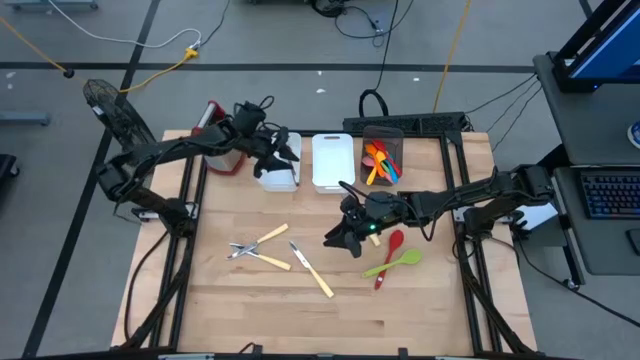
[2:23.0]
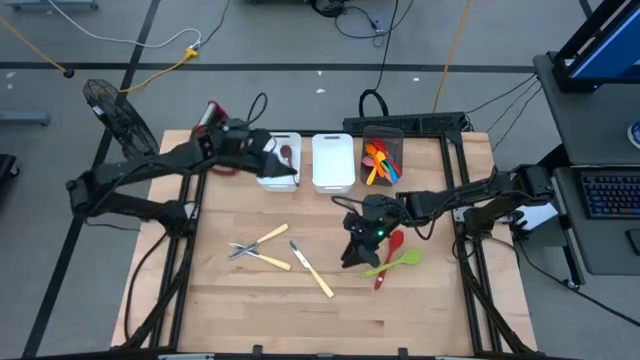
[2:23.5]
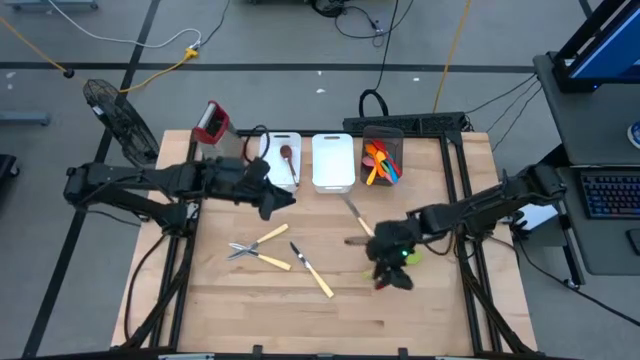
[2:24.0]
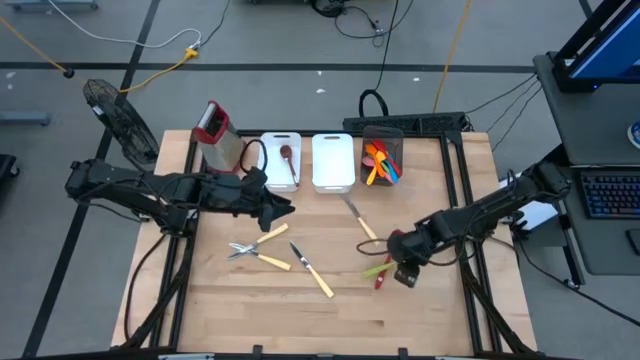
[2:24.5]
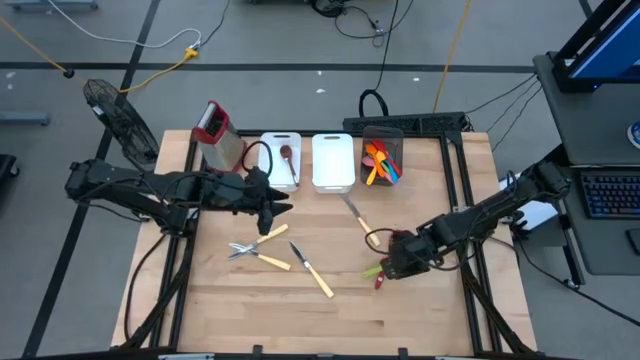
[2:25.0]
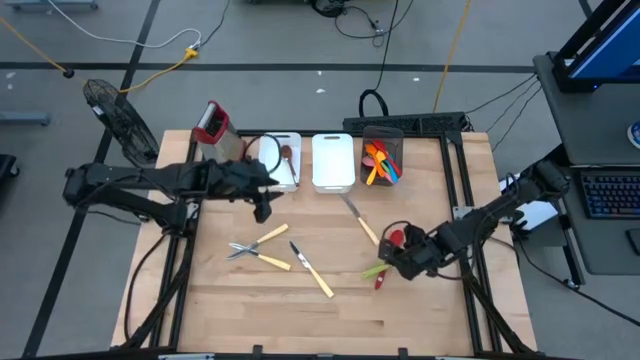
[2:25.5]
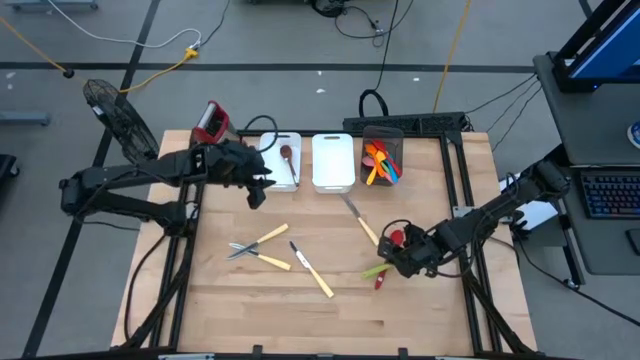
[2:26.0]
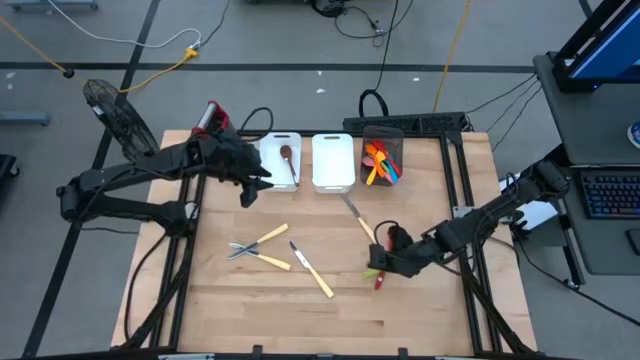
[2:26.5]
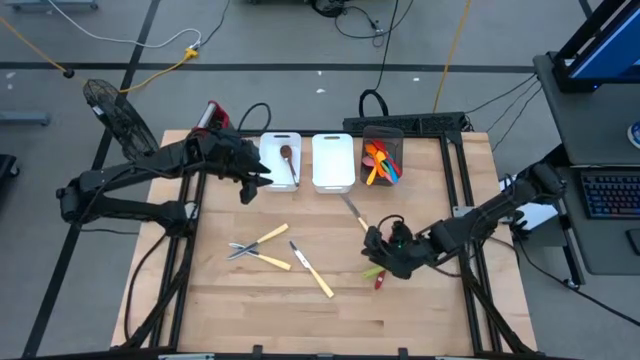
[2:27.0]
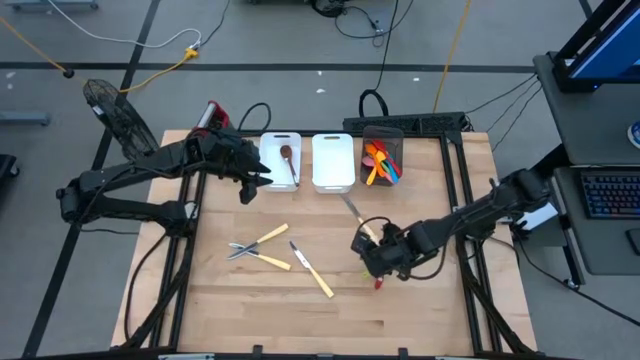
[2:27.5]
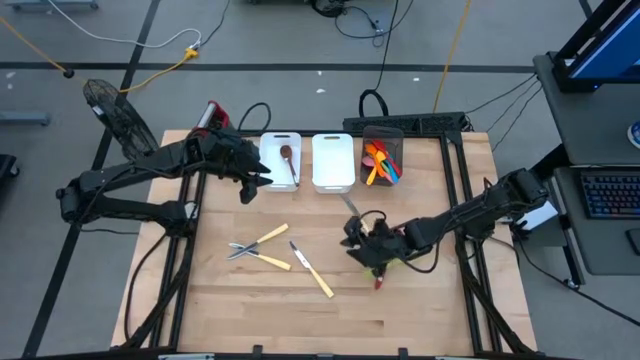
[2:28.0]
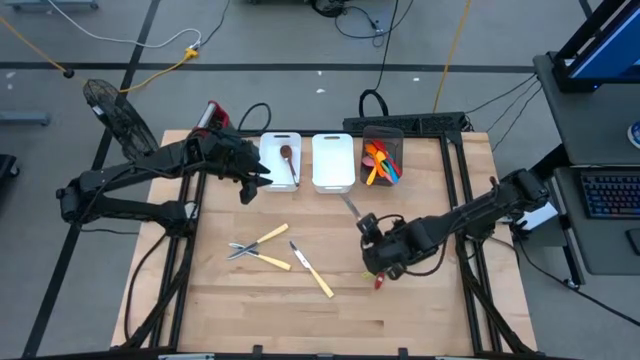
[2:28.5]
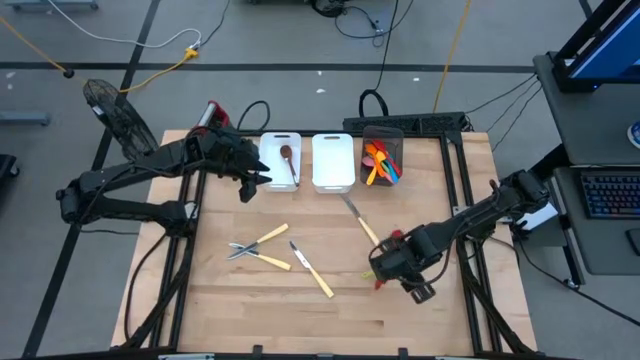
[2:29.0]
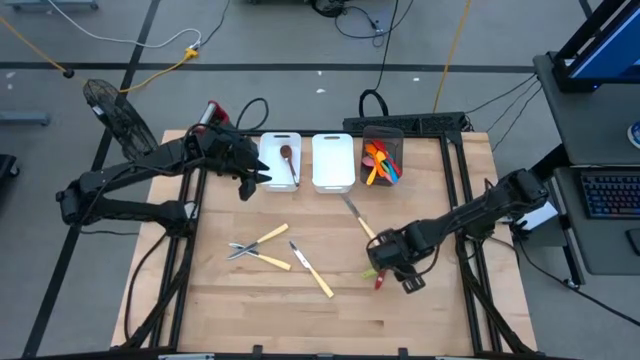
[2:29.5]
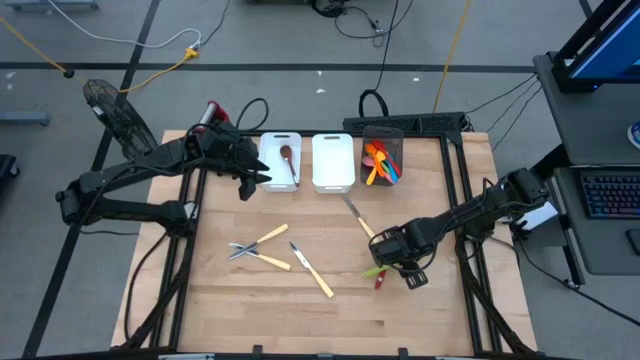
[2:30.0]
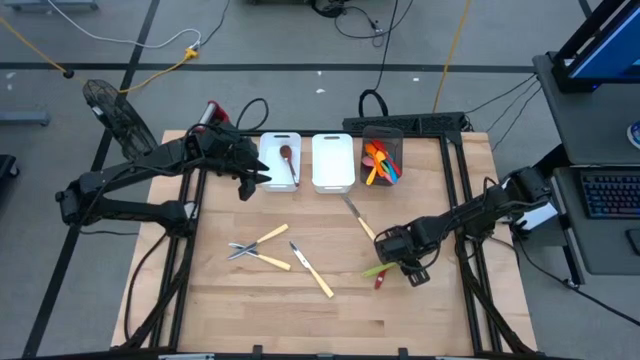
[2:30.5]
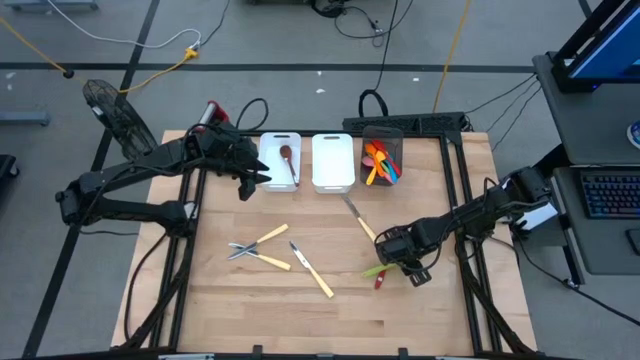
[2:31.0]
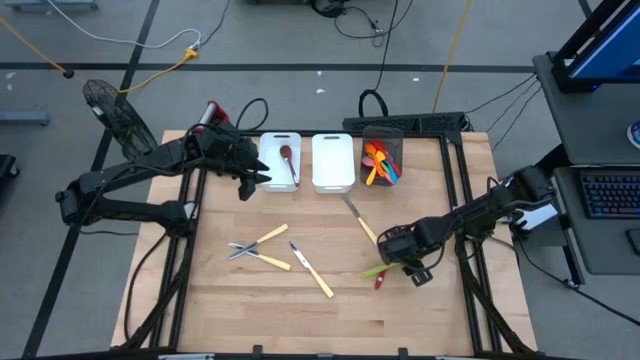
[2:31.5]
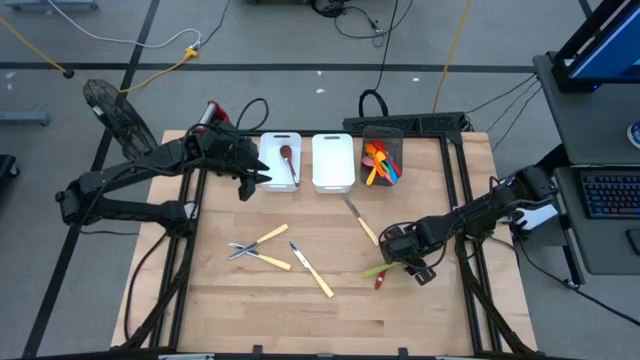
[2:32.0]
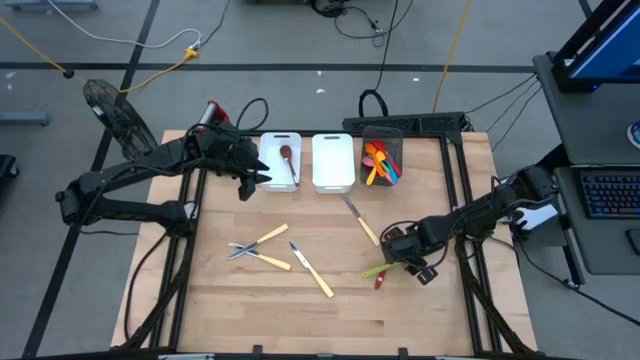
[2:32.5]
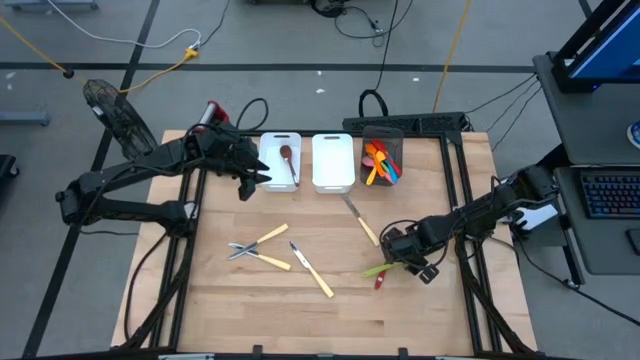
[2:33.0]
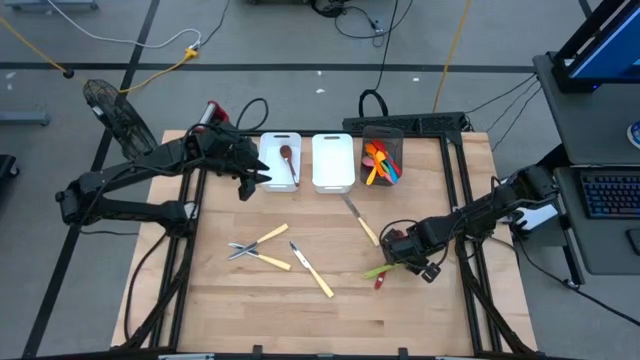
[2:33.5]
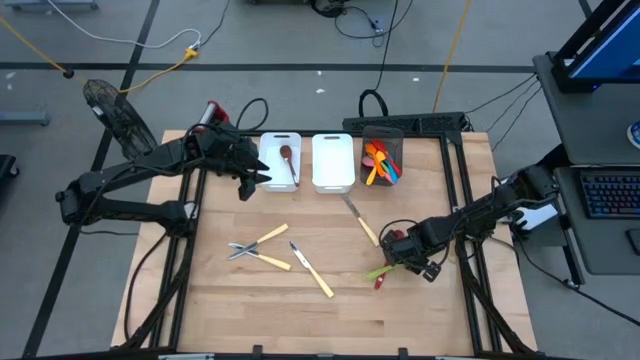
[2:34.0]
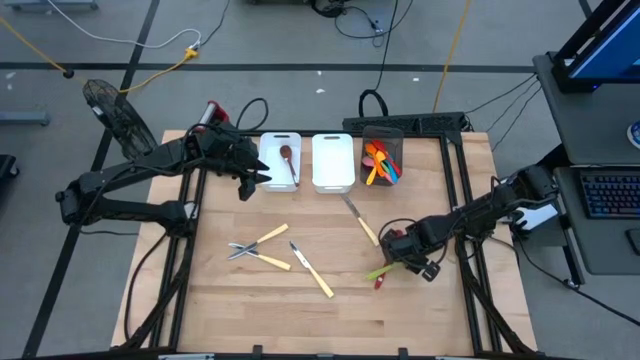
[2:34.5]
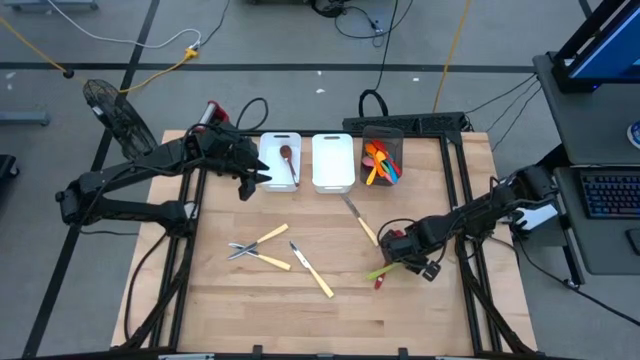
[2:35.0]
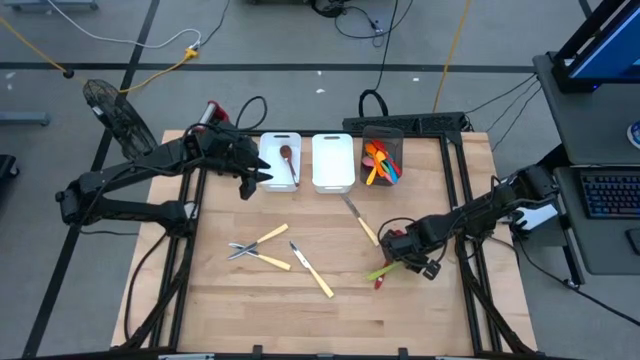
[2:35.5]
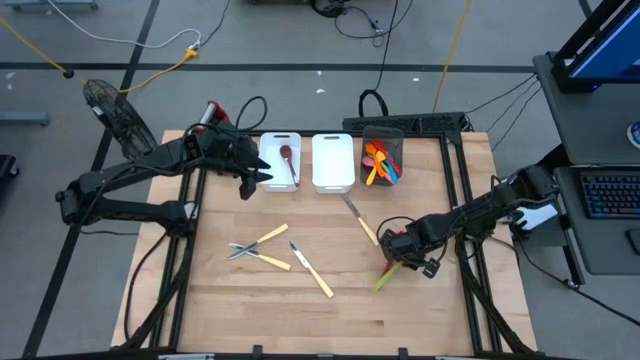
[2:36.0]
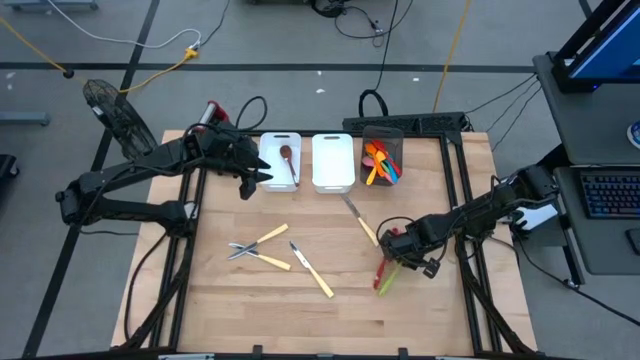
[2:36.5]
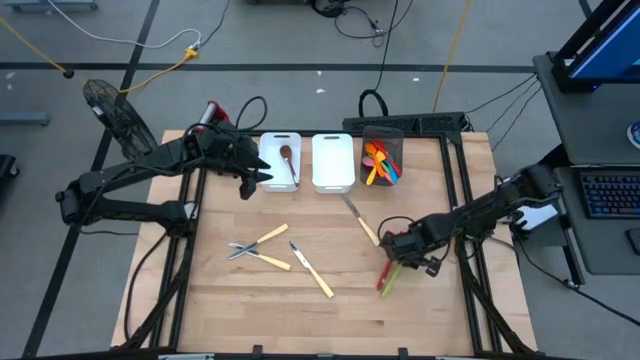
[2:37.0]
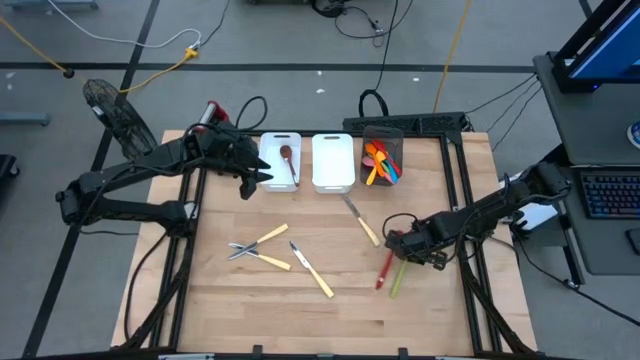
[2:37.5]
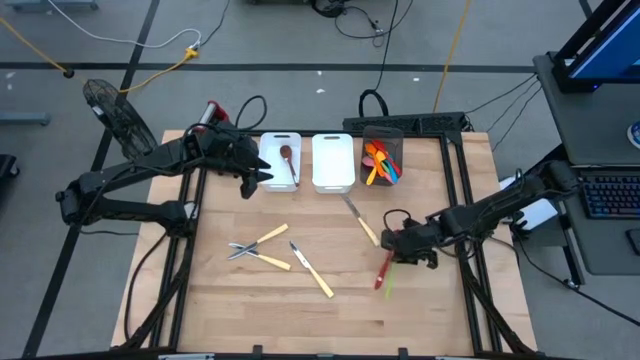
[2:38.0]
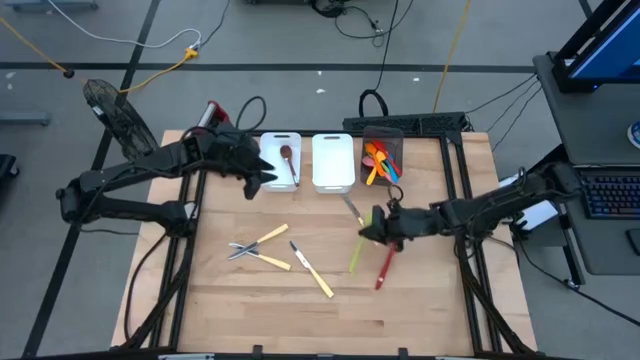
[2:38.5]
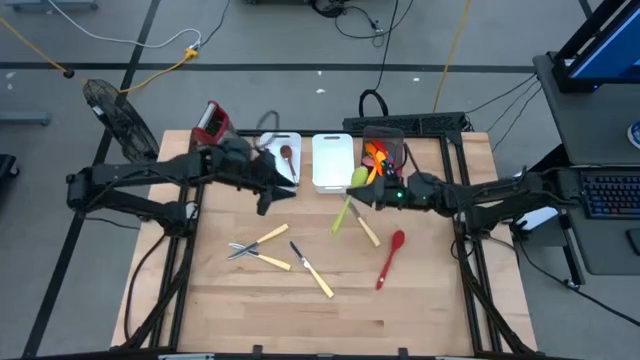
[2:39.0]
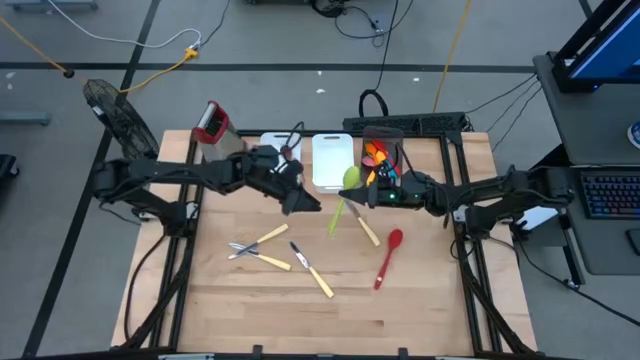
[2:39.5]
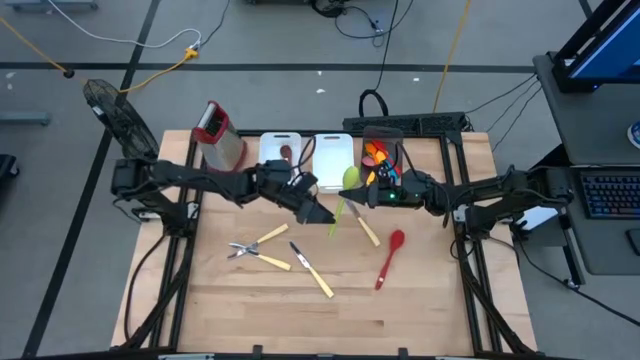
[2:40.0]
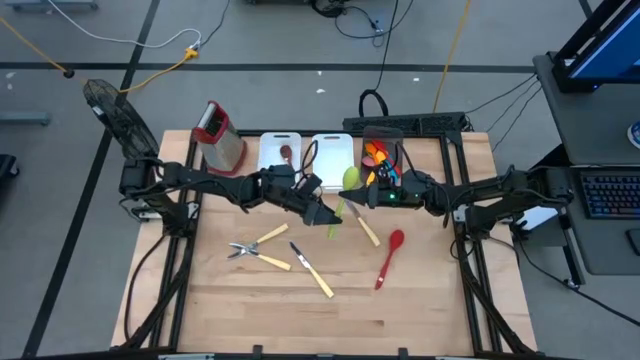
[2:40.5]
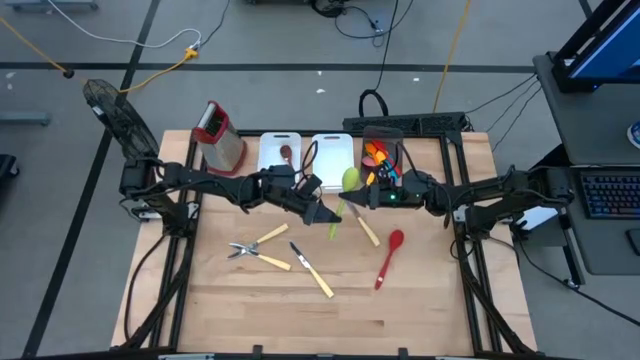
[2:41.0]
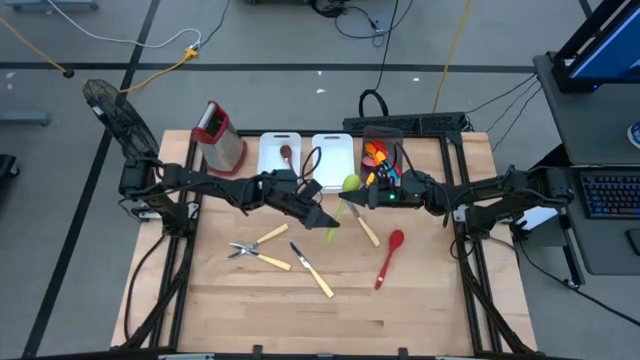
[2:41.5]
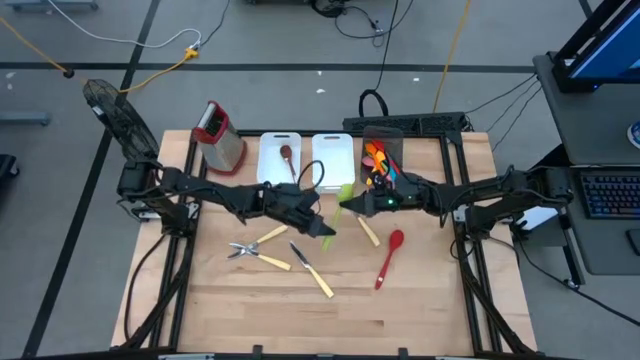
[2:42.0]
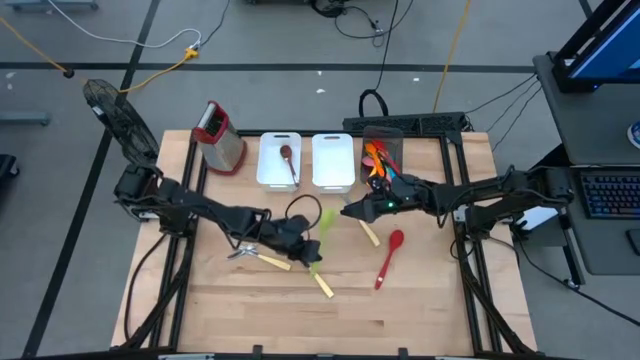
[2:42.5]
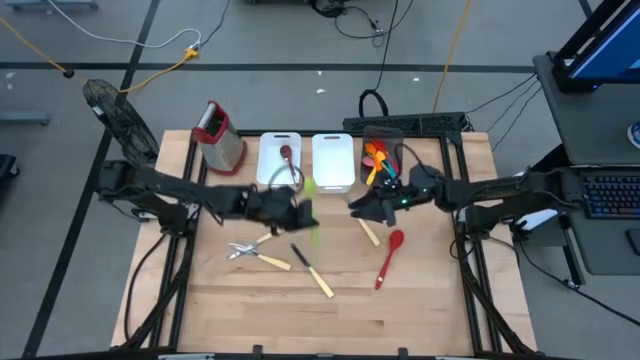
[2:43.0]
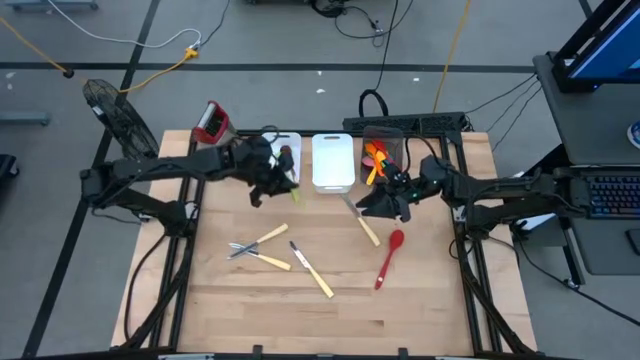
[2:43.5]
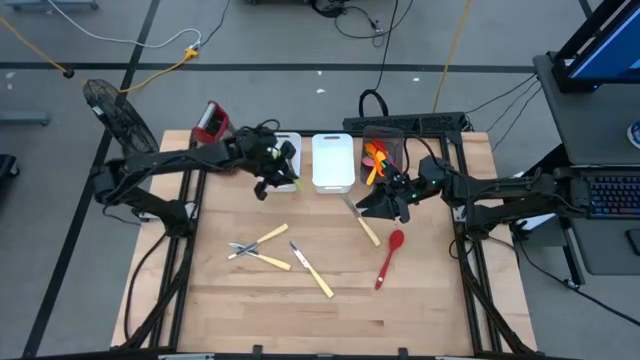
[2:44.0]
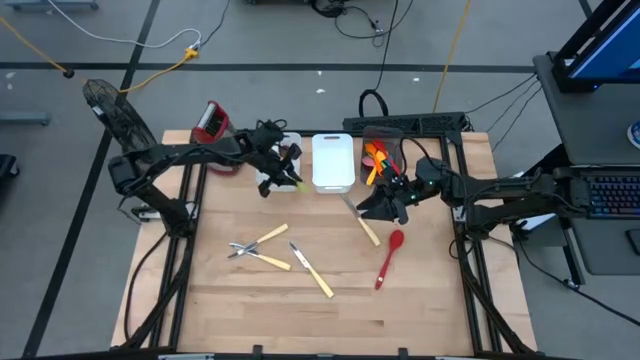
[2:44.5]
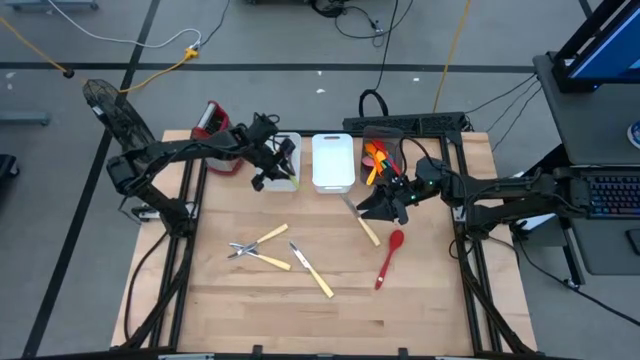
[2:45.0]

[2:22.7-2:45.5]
Task: Pick & Place Kitchen Items
Put the green serving spoon into the left white bin
